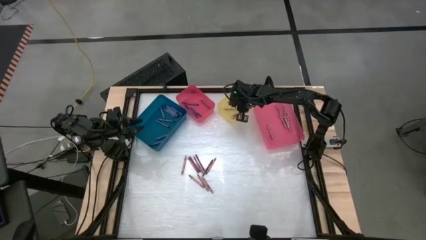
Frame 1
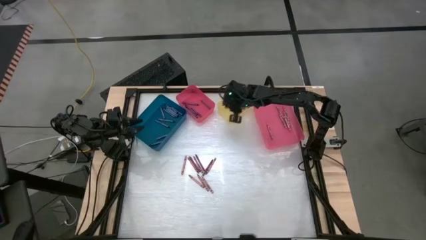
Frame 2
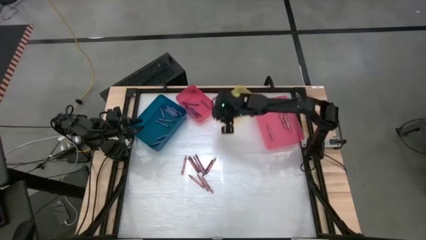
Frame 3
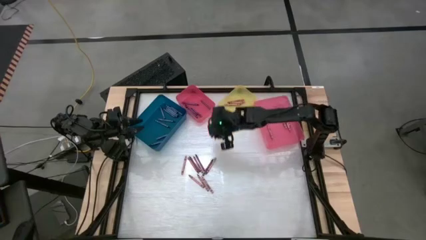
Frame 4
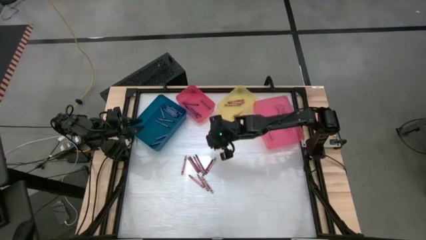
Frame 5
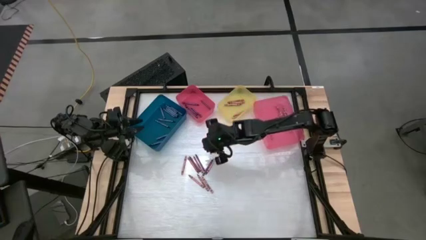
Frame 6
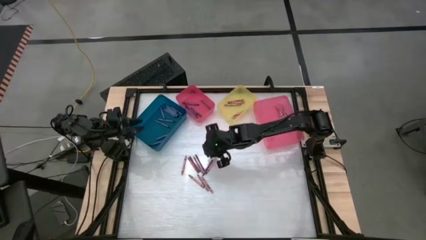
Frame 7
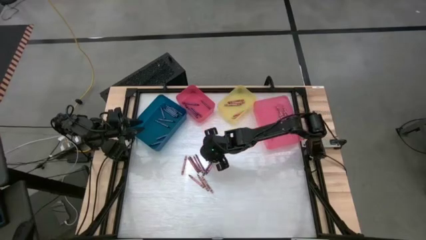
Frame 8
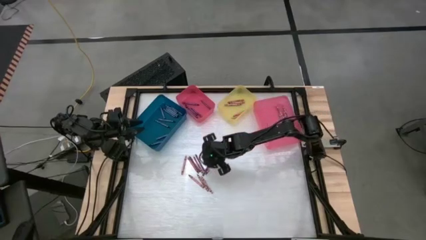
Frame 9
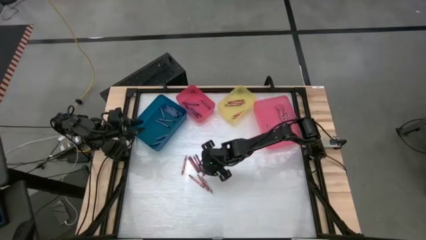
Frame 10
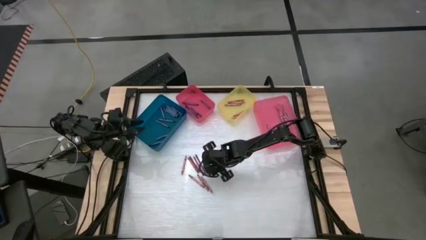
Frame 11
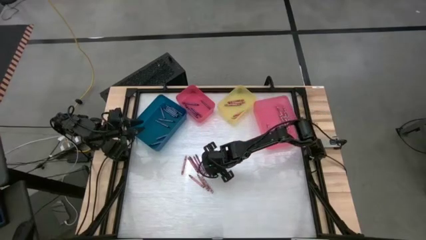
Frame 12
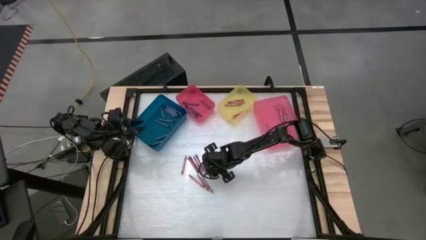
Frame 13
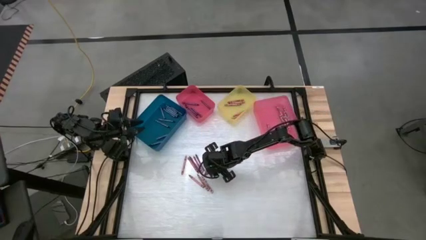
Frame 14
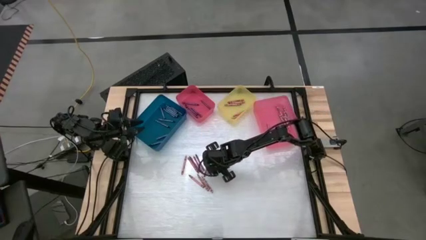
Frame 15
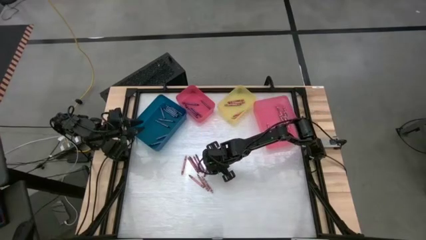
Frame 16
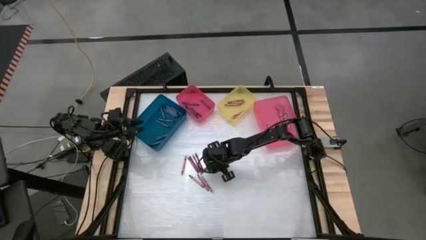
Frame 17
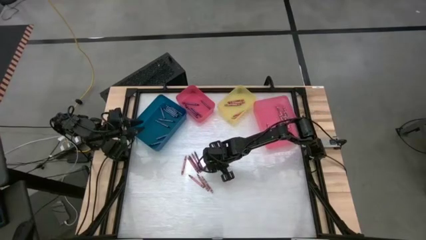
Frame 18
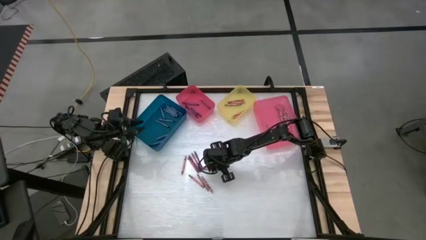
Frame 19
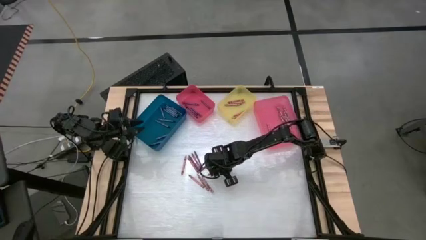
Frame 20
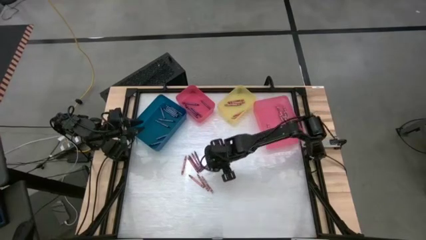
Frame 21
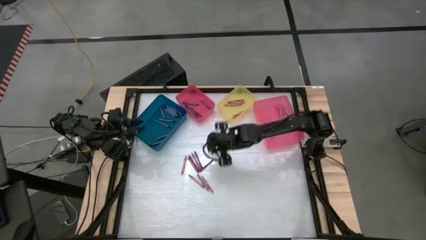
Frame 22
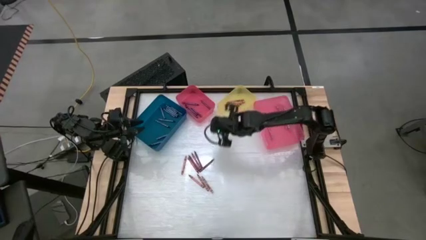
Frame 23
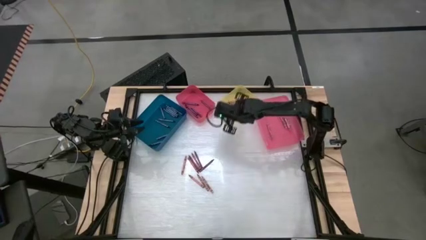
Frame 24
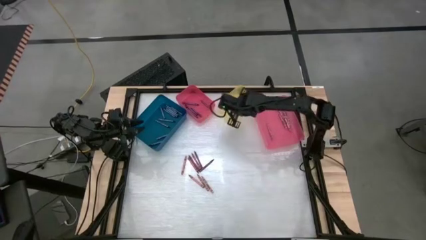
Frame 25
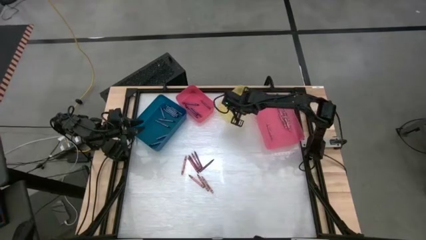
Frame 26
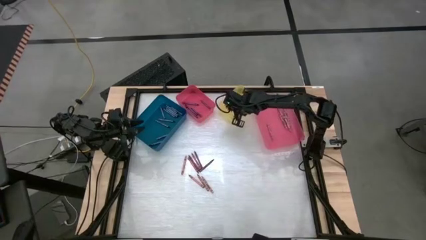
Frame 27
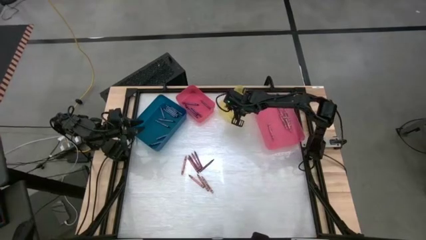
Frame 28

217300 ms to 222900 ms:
Task: Sort crayons
Put the red crayon into the yellow bin

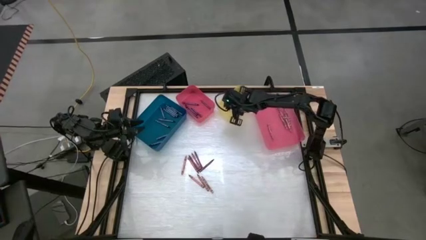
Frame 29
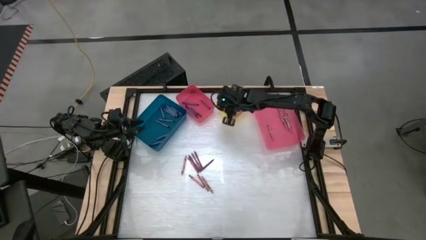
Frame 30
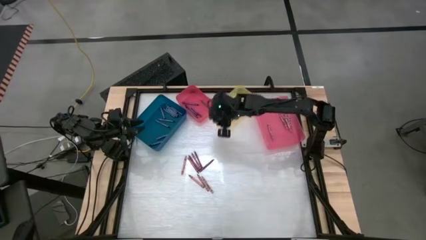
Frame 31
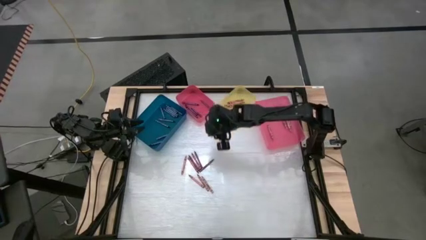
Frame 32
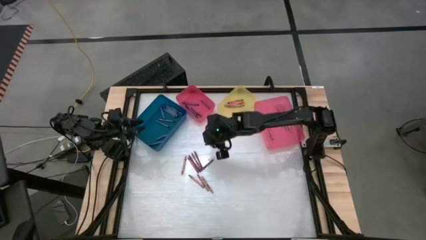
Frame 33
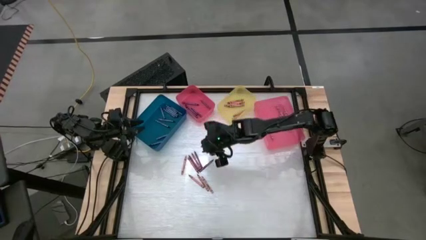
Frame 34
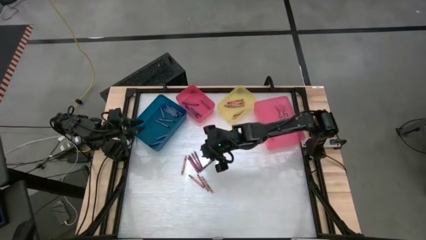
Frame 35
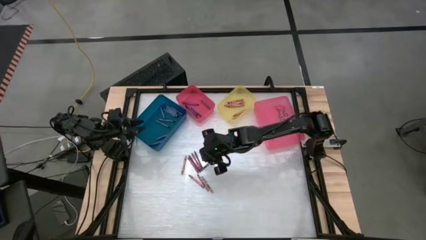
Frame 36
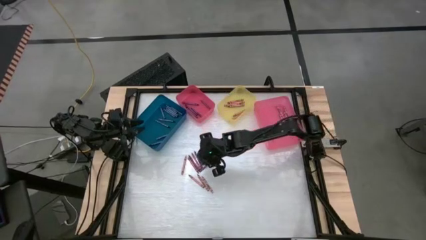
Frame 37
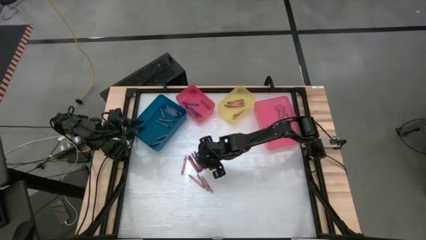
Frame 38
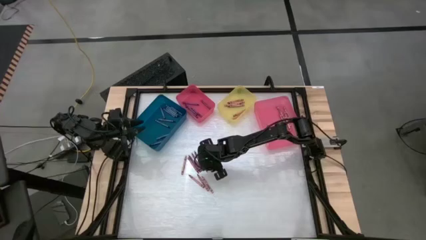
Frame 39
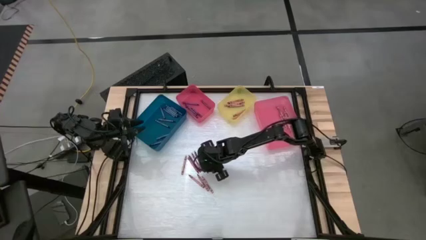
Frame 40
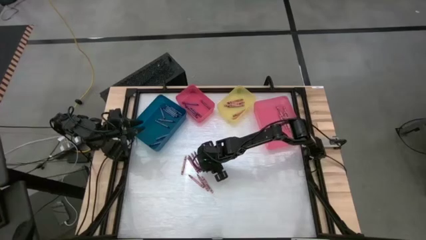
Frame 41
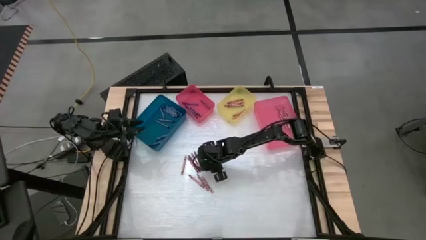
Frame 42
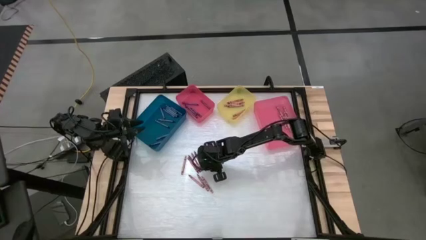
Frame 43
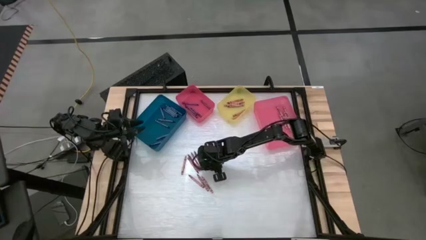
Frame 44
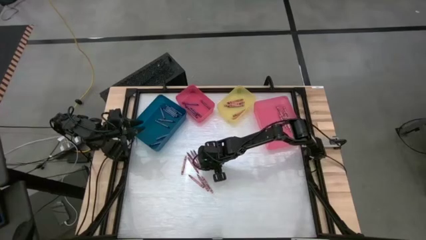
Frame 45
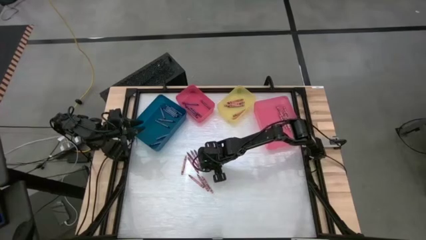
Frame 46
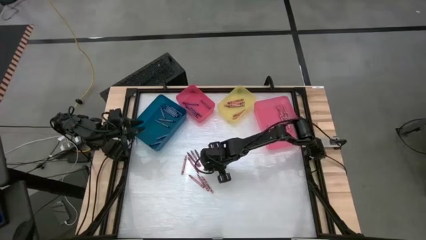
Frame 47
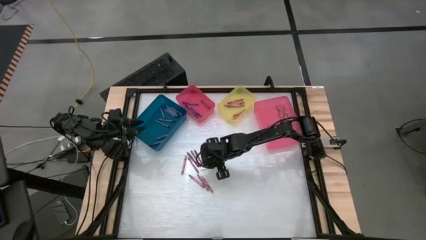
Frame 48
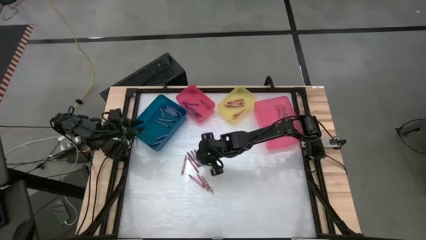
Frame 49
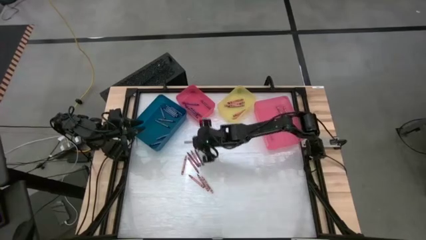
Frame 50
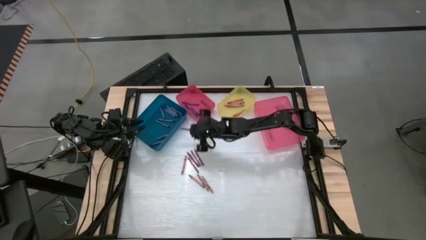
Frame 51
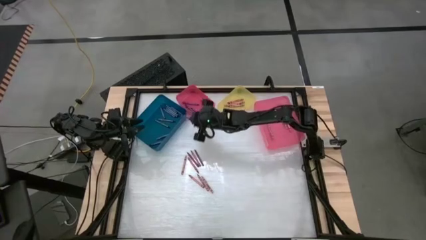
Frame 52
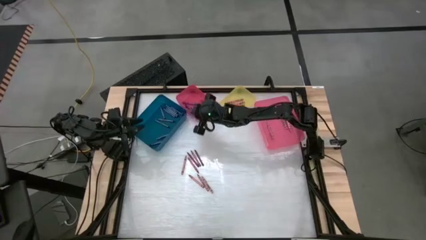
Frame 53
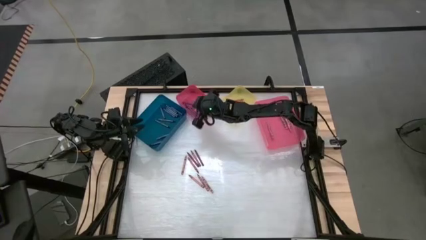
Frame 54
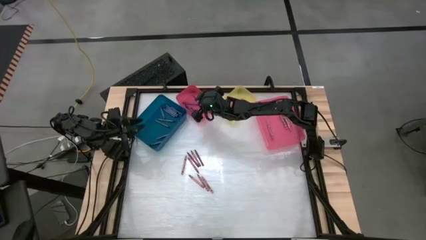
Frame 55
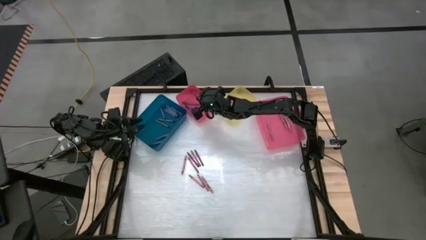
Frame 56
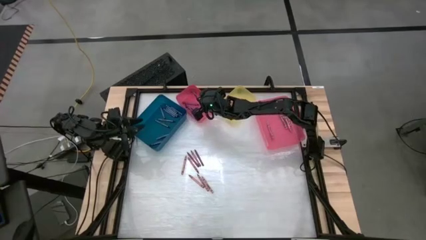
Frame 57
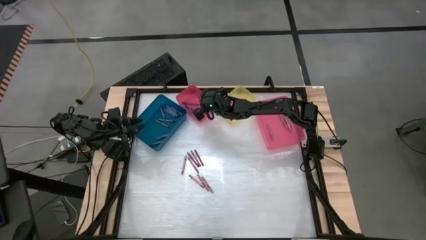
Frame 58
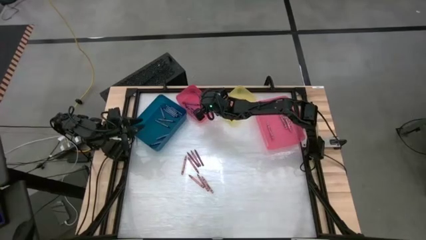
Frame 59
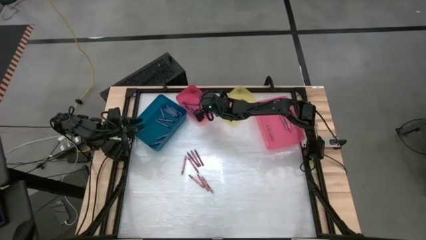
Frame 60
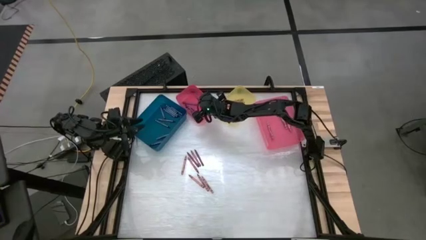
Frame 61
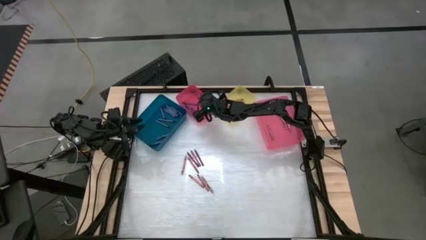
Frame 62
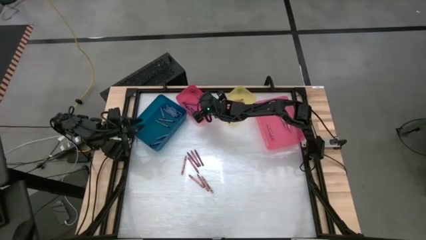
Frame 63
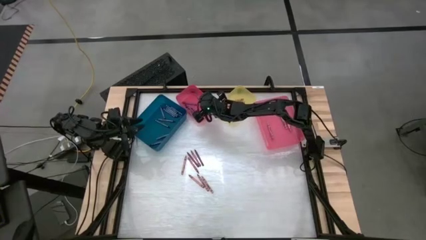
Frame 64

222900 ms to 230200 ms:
Put the violet crayon into the left pink bin

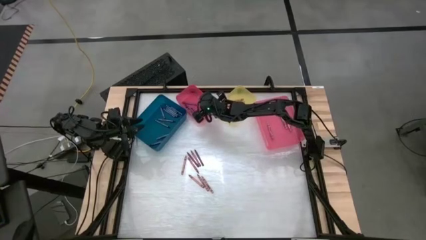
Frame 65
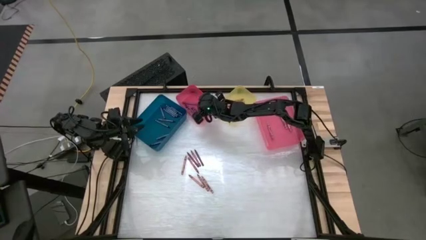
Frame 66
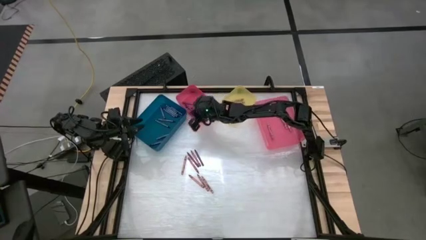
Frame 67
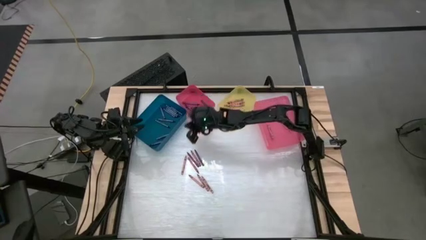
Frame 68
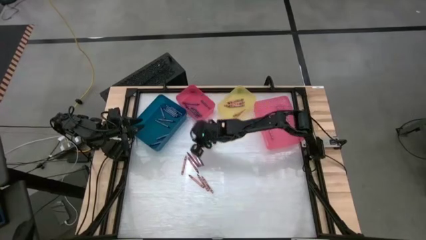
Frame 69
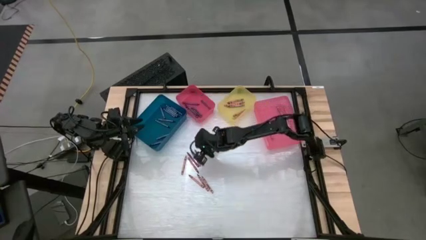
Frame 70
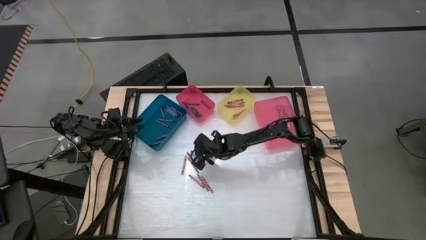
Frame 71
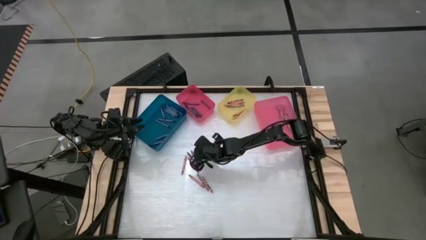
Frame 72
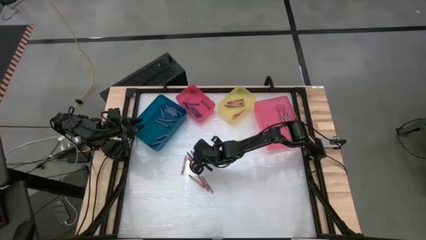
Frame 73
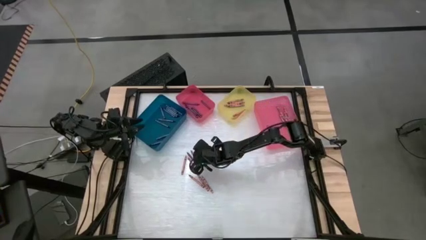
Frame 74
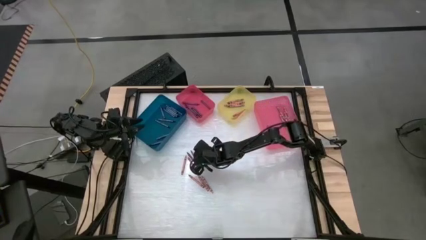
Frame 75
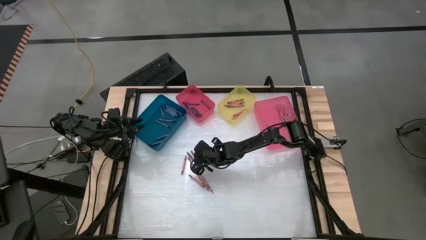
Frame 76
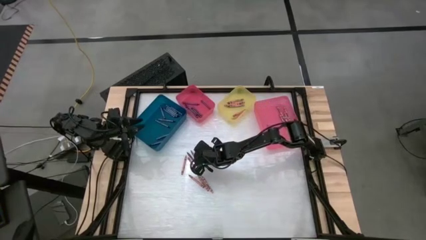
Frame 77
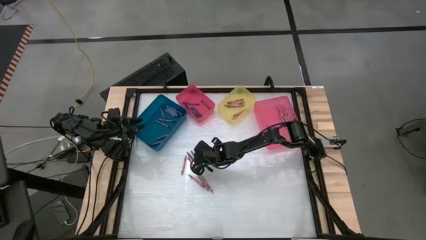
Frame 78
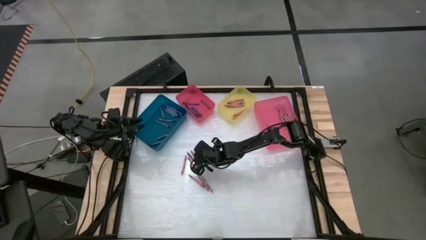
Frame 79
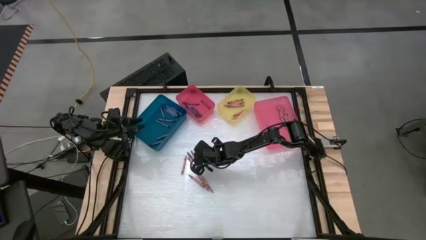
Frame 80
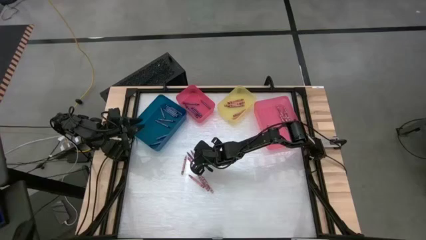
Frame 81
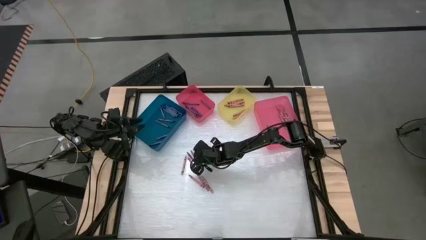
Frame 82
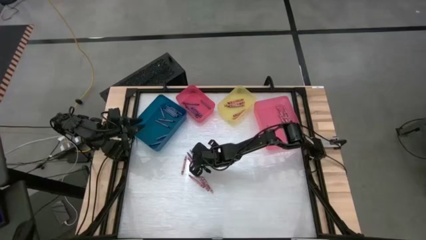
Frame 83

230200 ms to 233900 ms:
Put the red crayon into the yellow bin
